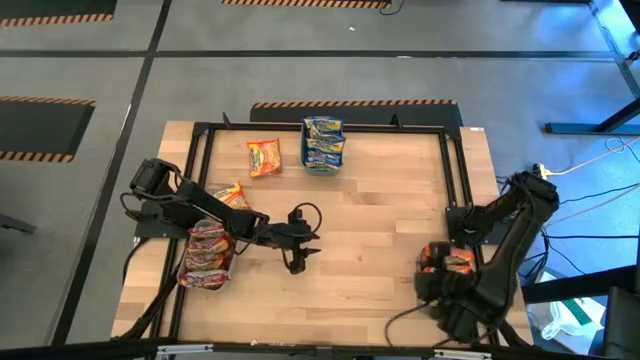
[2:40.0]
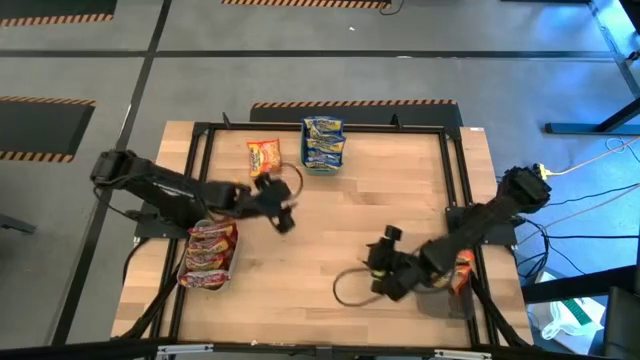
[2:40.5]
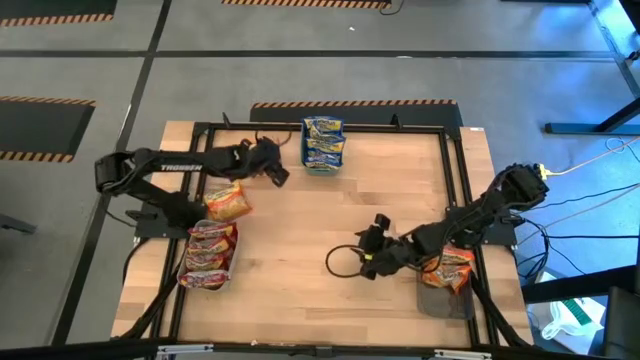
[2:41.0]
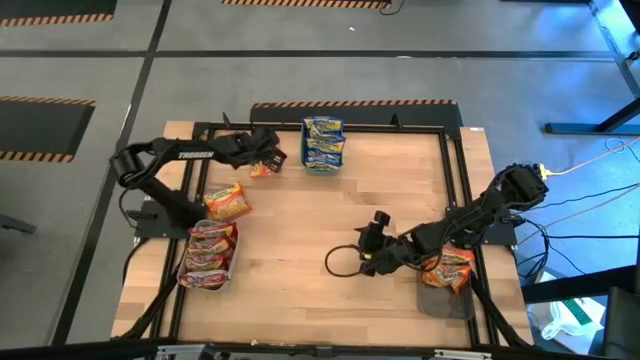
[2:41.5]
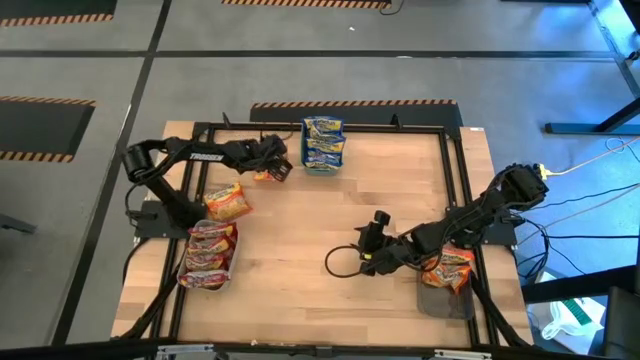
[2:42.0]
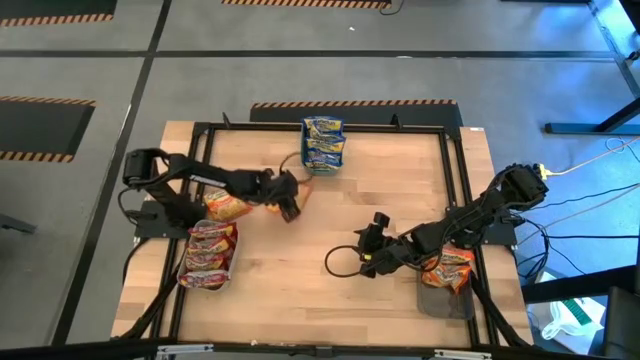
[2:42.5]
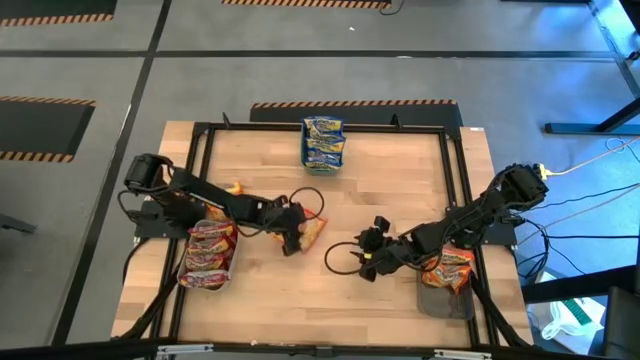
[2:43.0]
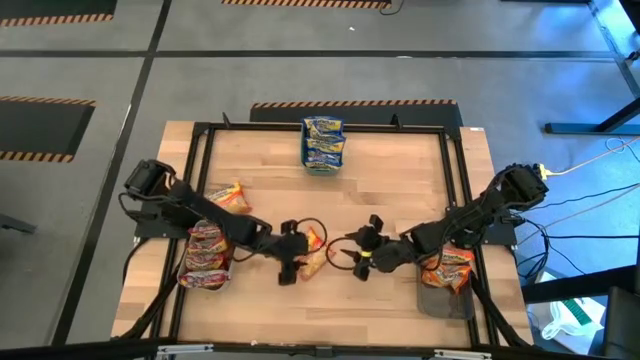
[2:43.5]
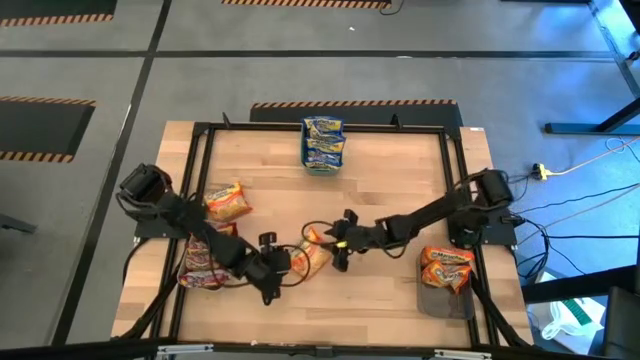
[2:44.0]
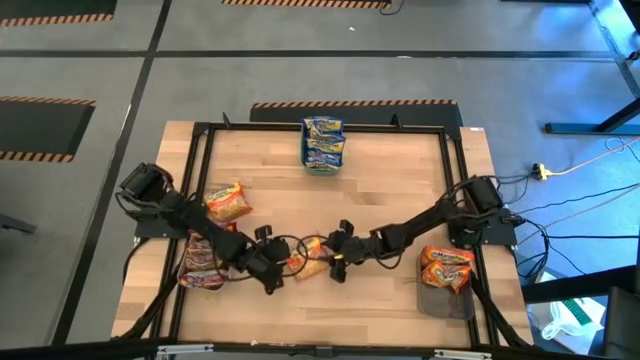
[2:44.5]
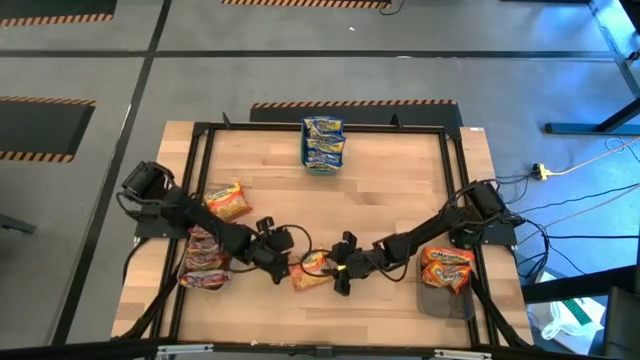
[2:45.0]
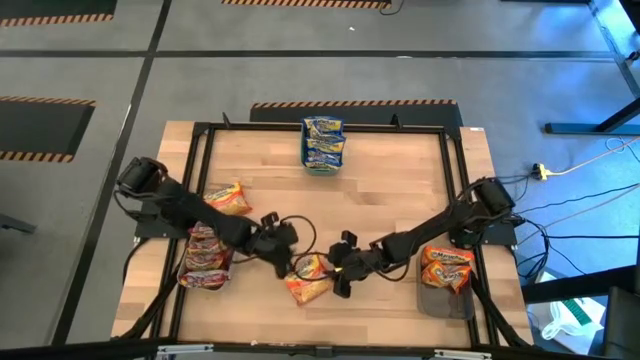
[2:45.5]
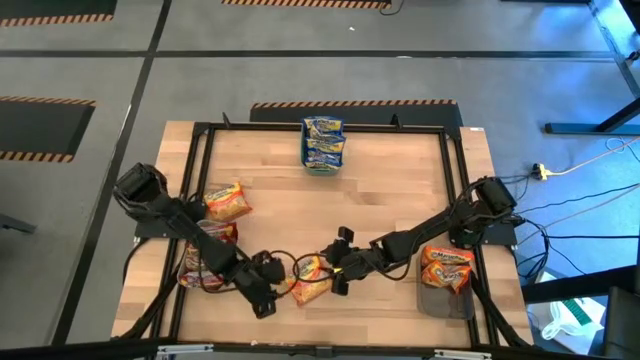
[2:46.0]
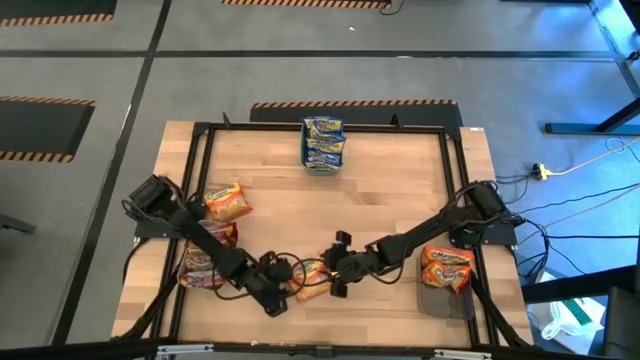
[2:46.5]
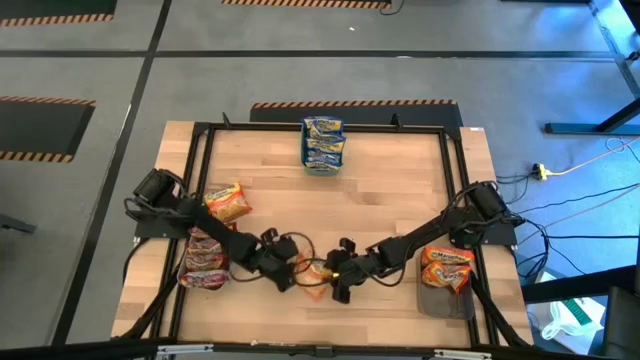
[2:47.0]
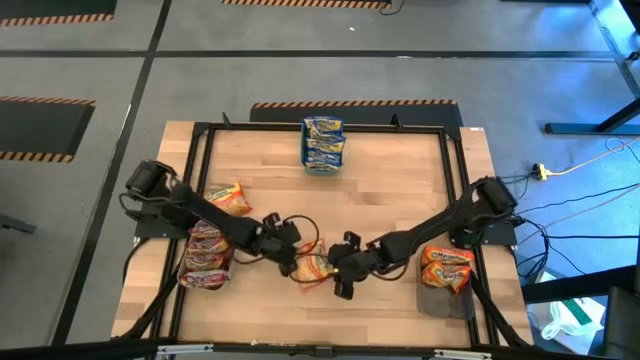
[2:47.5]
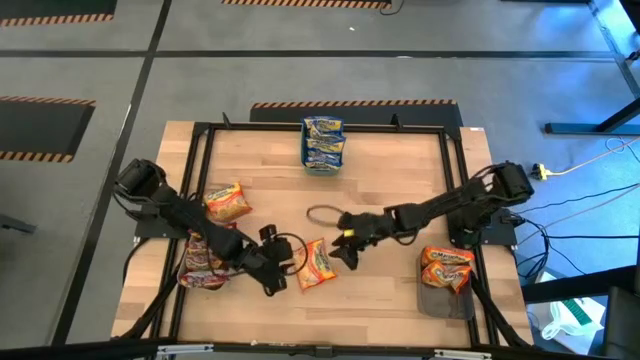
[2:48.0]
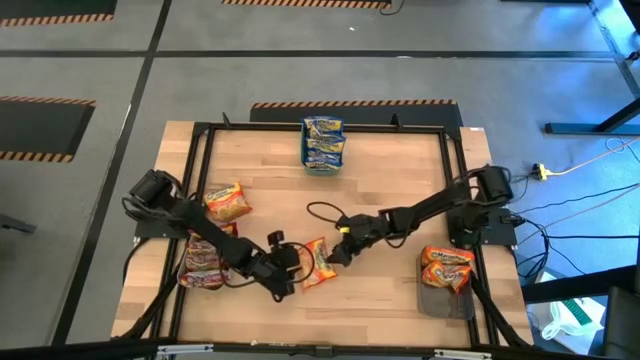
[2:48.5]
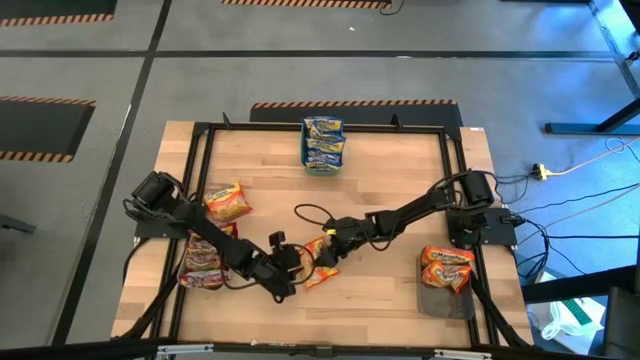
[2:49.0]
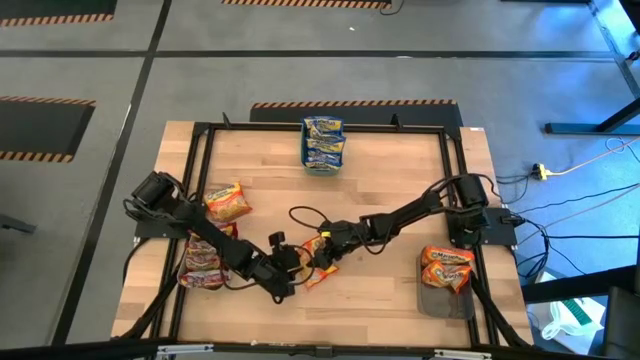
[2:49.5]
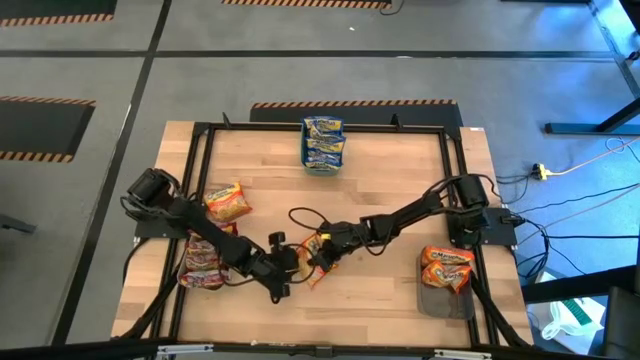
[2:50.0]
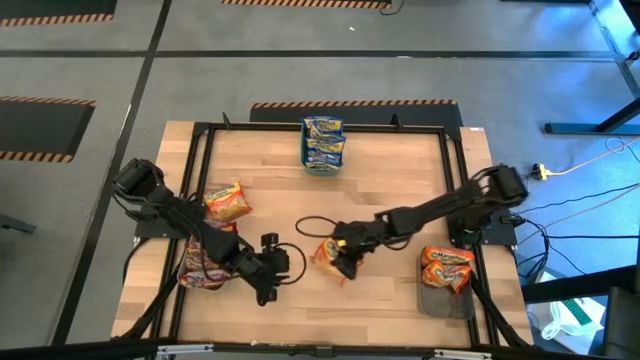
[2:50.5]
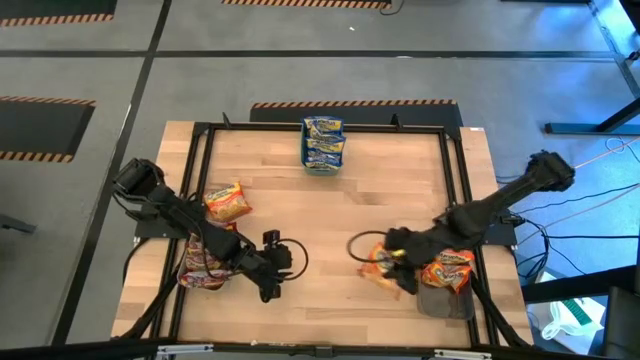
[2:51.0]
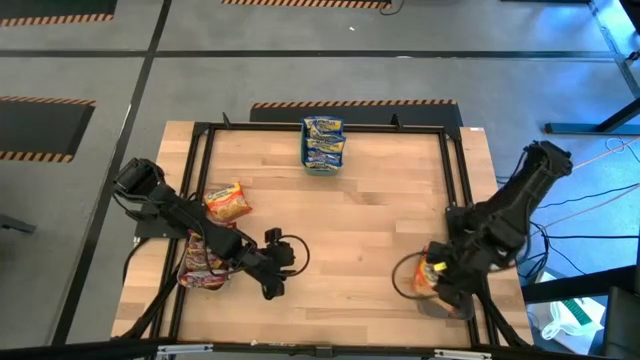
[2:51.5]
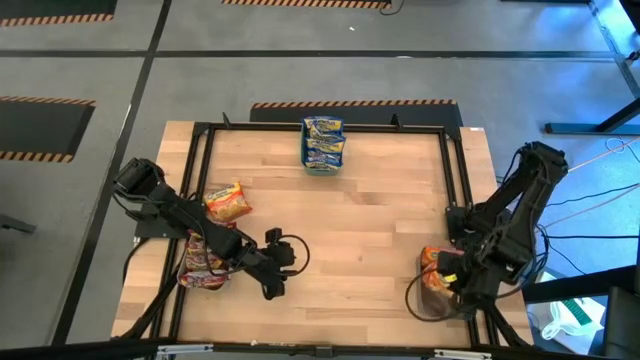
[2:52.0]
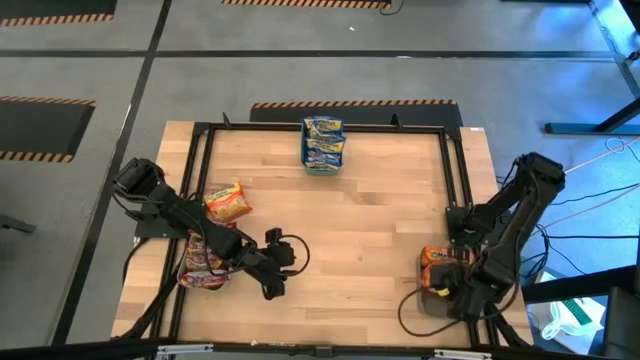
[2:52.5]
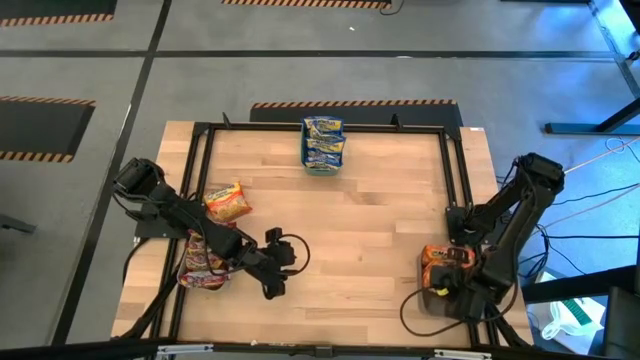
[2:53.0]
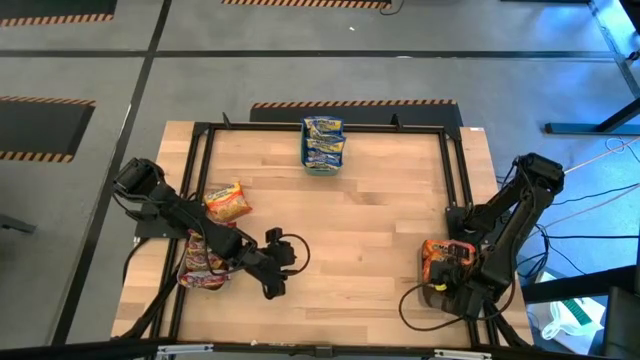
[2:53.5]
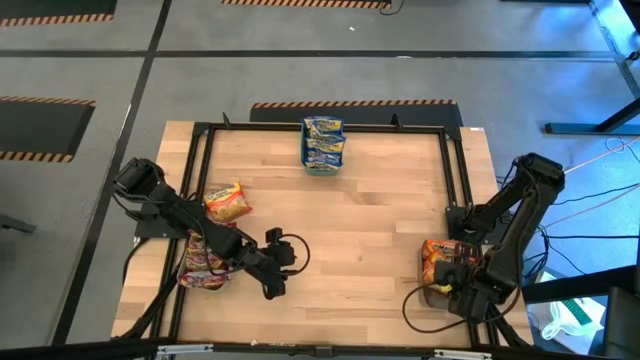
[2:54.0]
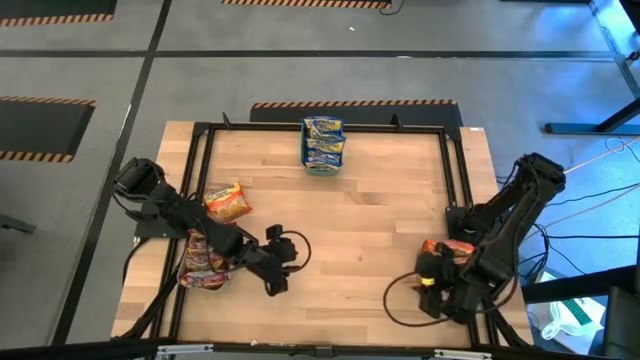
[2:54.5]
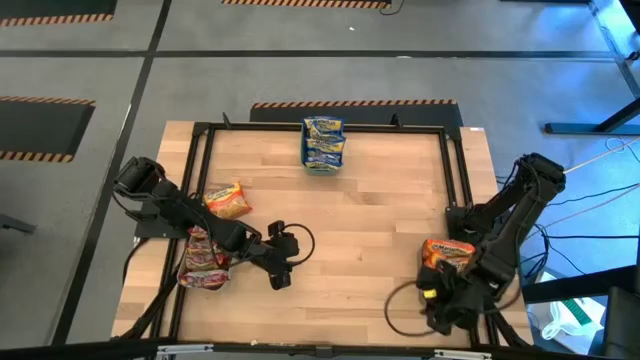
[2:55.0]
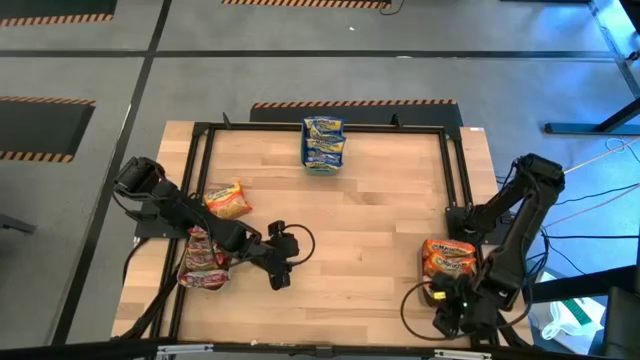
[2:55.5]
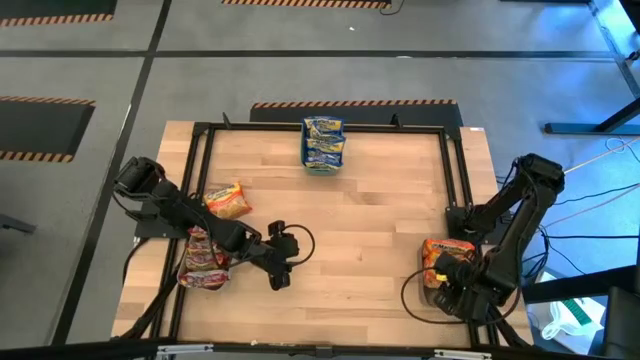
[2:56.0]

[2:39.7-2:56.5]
Task: Sort Maruchan noodles
Put the orange noodle pack into the black bin

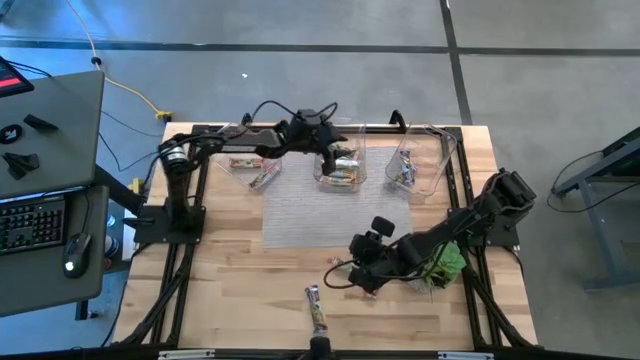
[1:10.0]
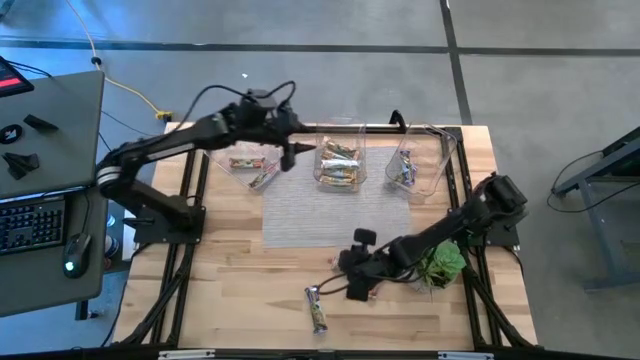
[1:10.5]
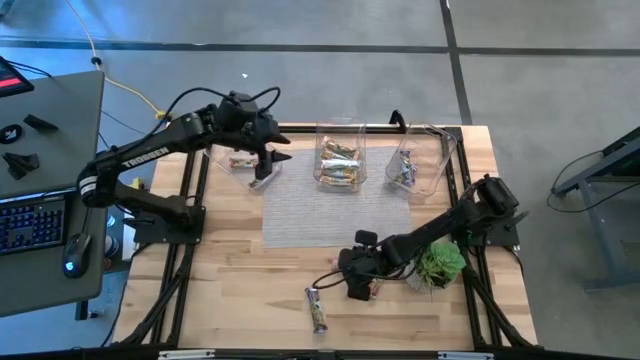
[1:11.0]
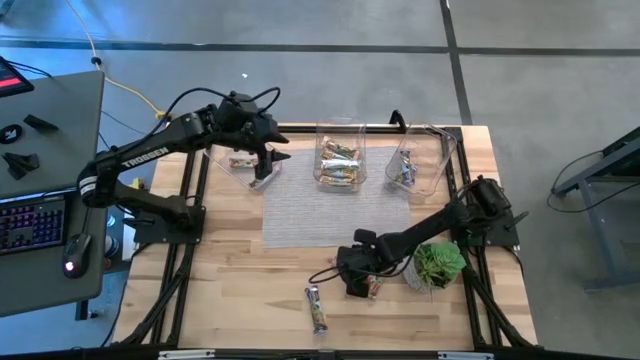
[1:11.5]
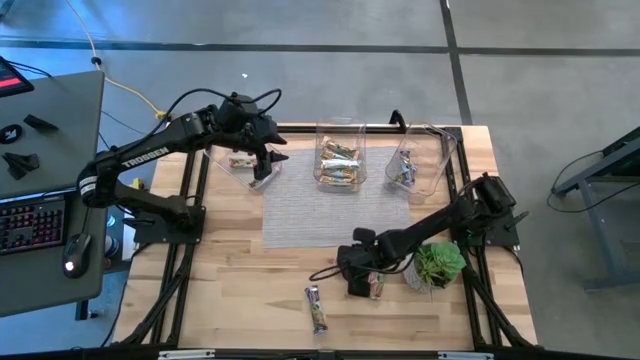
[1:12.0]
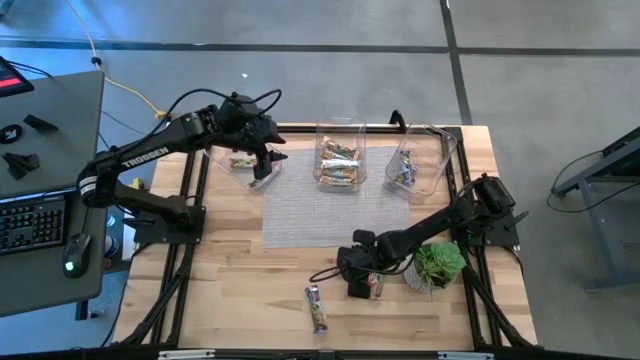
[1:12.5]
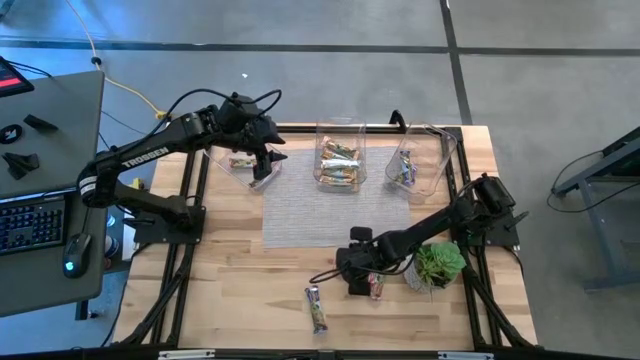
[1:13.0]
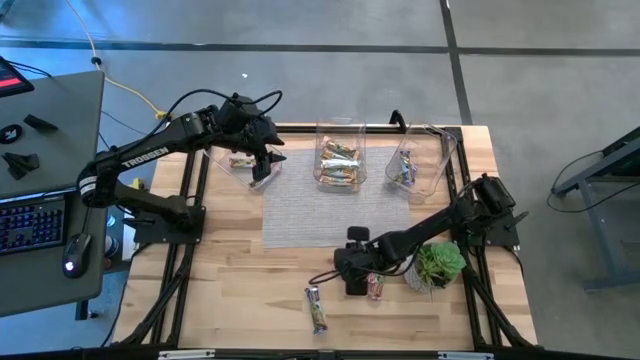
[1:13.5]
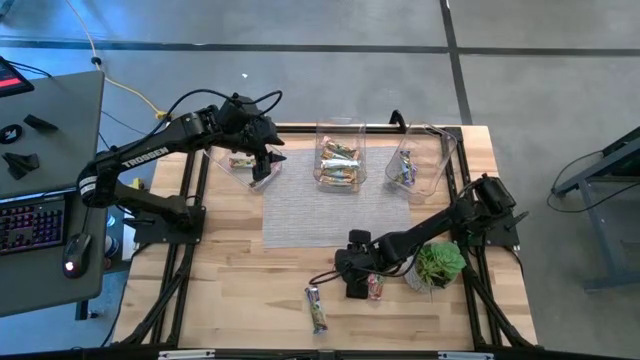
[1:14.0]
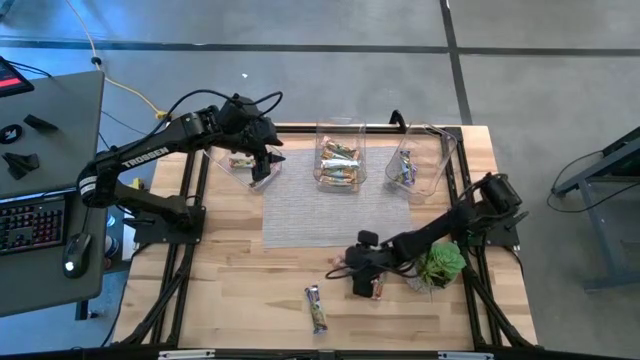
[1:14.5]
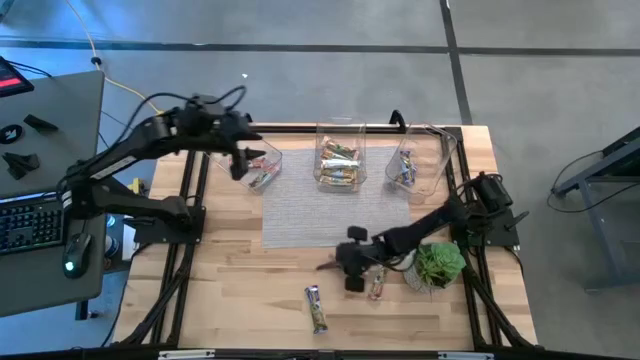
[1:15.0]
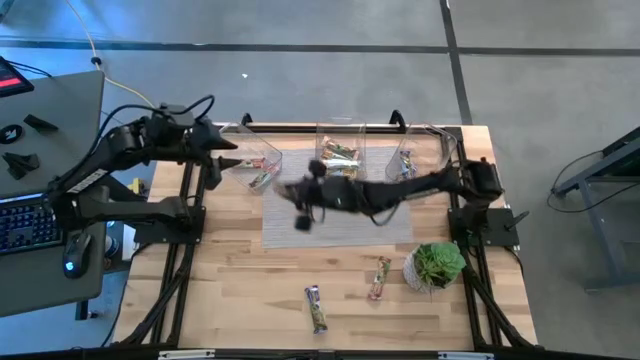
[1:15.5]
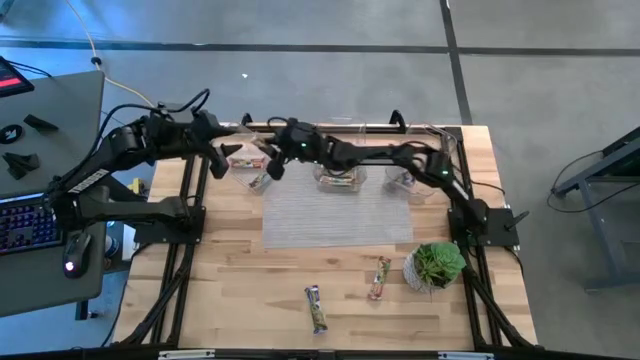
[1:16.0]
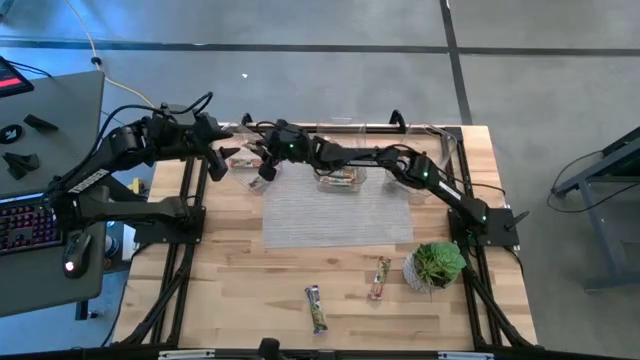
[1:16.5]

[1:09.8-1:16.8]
Task: Pick and place Granola Bars by type
Put the red granola bar into the left transparent bin
